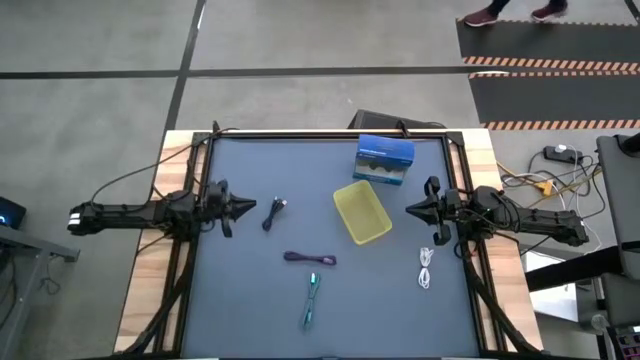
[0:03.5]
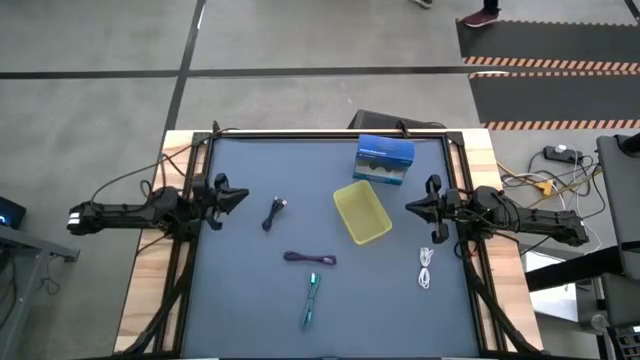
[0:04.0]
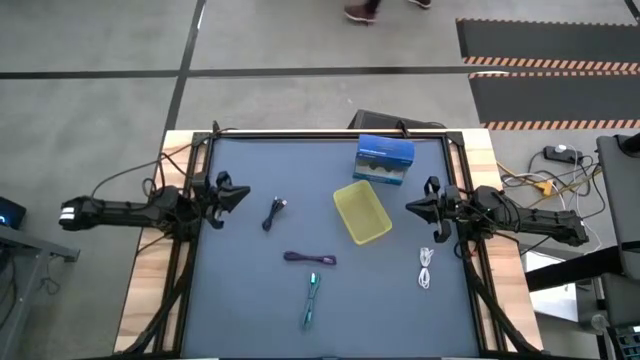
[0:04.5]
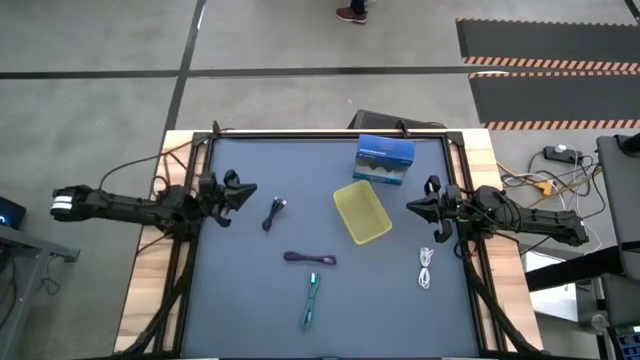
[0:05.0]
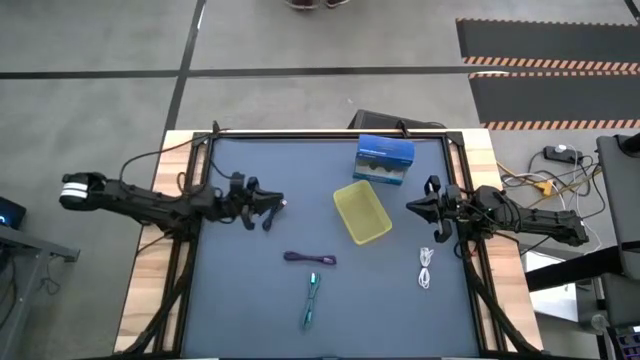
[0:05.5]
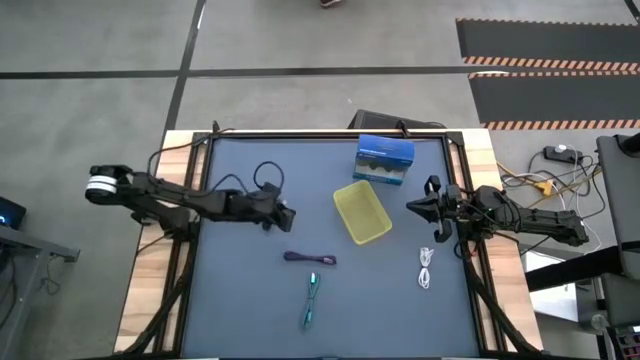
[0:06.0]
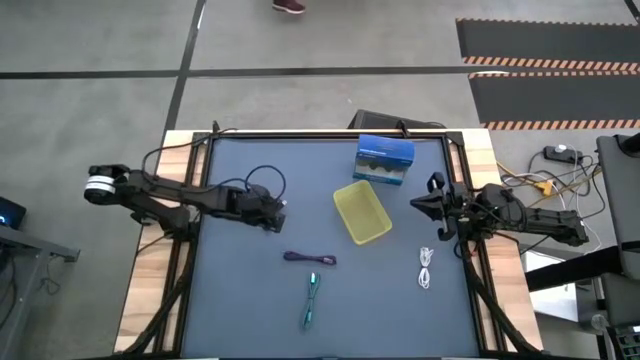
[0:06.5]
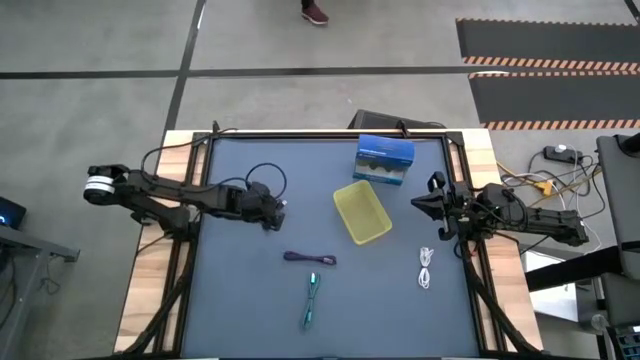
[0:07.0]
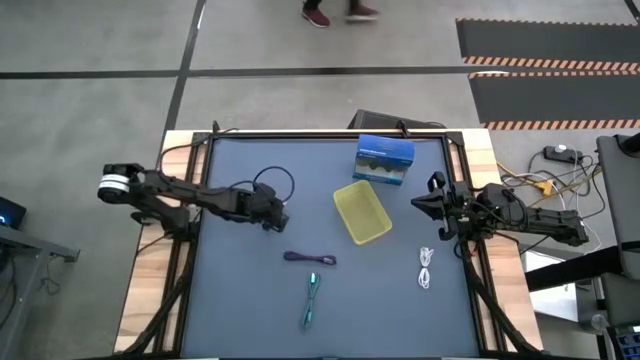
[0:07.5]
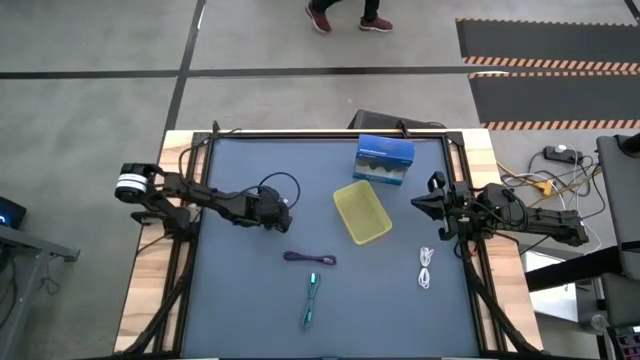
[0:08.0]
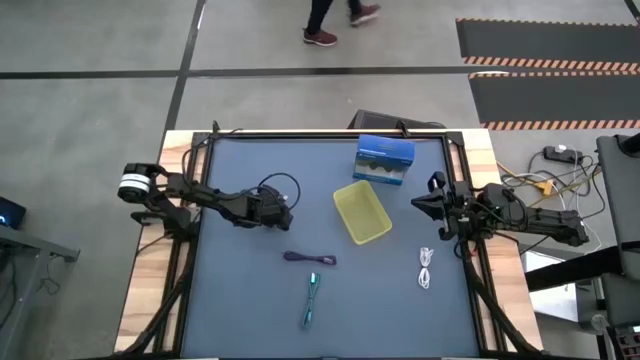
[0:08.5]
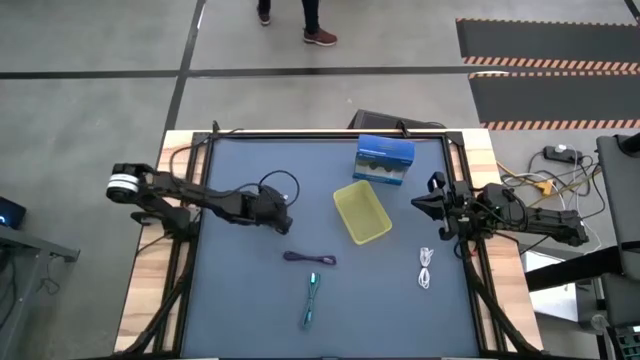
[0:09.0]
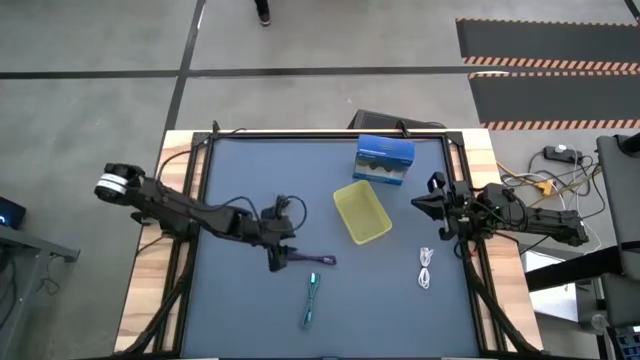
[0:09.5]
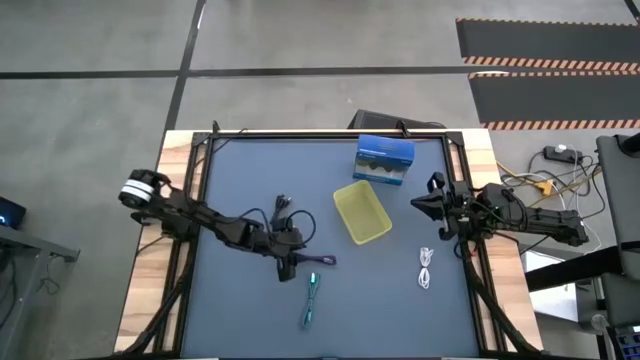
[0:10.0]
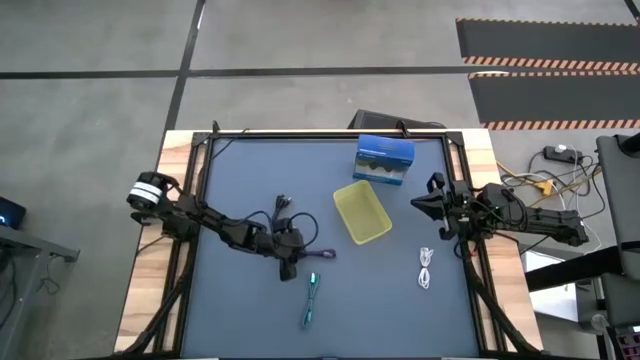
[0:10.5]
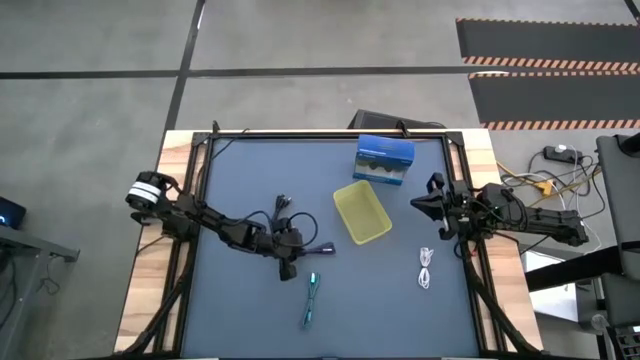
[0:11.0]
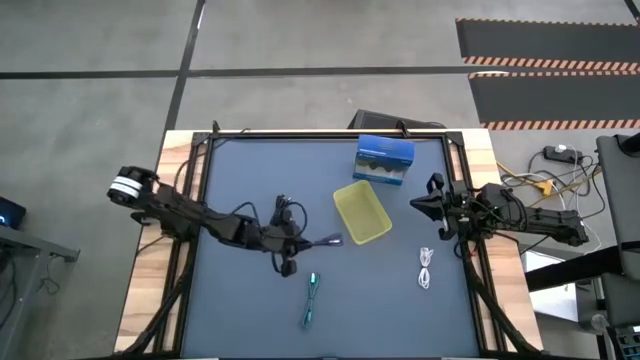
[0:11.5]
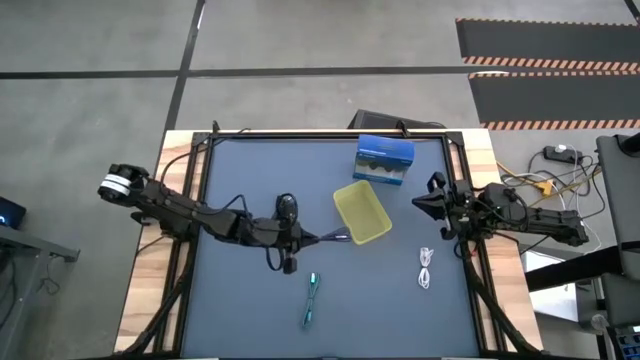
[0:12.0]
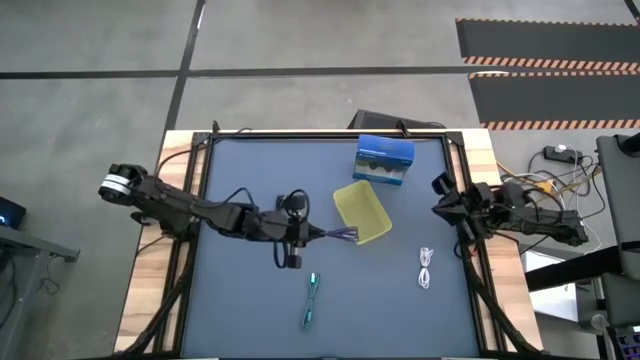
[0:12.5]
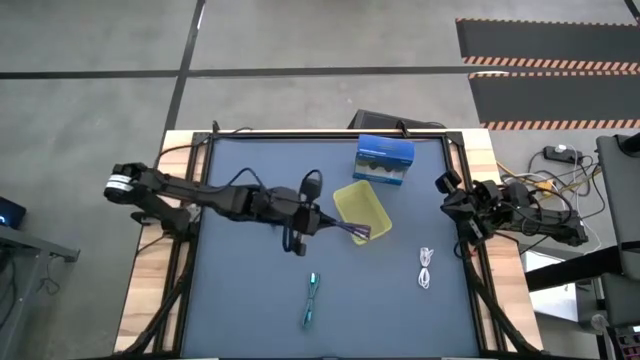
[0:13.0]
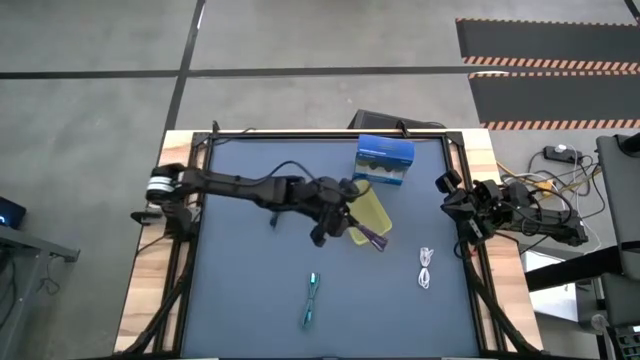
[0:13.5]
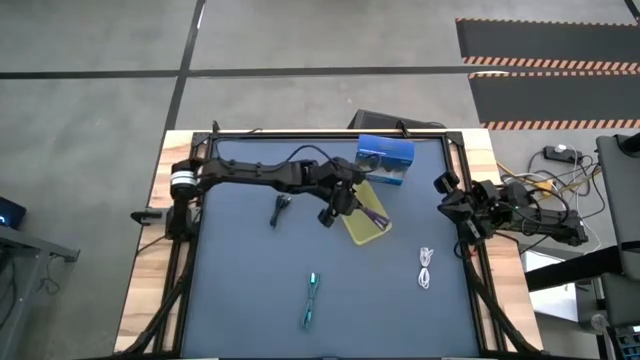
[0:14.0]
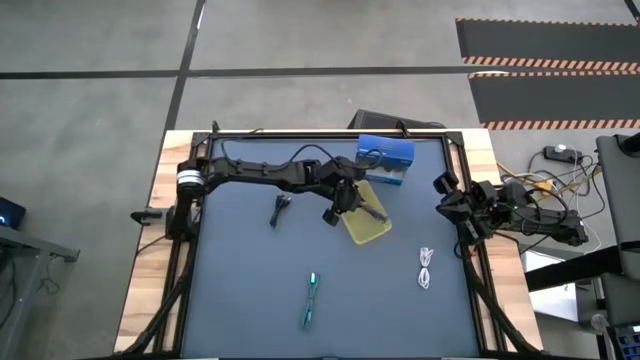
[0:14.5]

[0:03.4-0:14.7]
Task: Pick and place USB-C Cables
Put the purple charger cable into the yellow bin

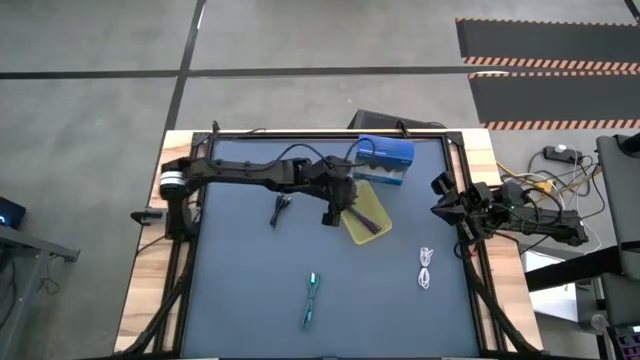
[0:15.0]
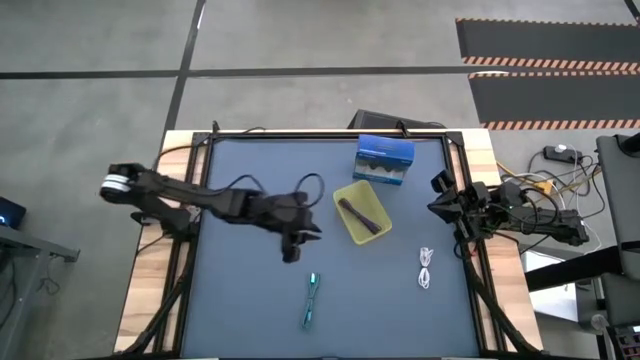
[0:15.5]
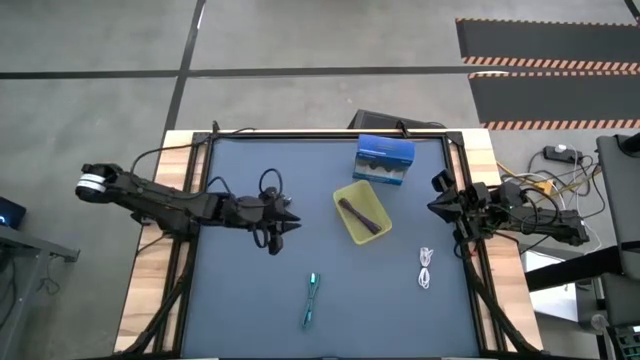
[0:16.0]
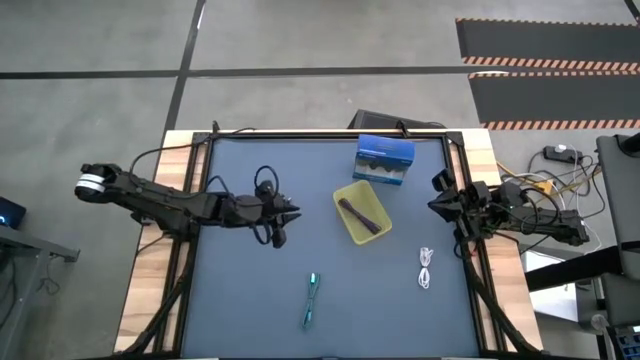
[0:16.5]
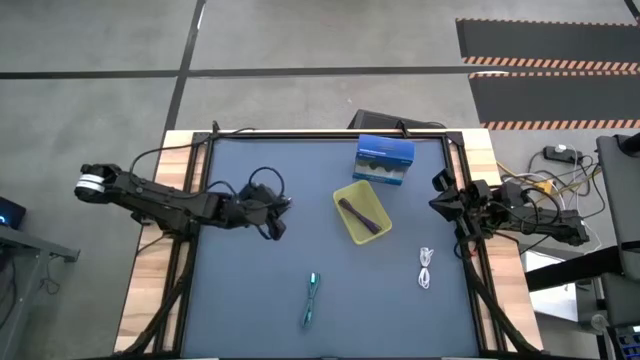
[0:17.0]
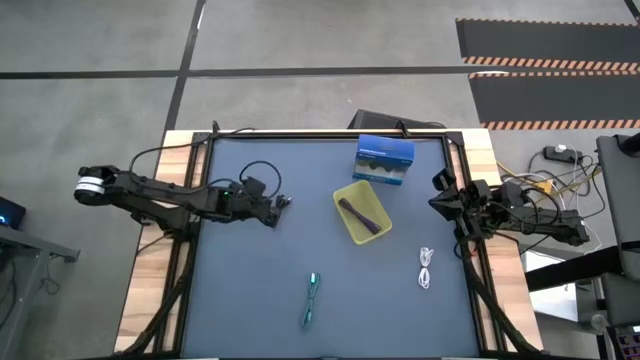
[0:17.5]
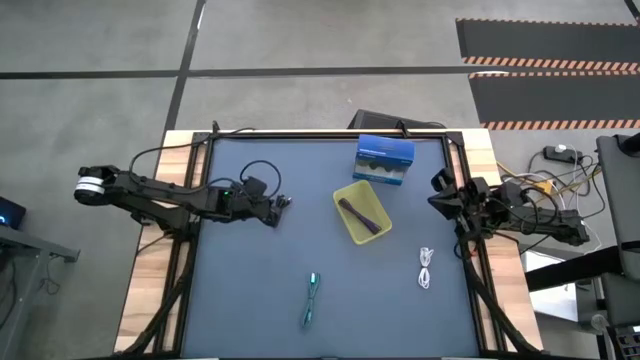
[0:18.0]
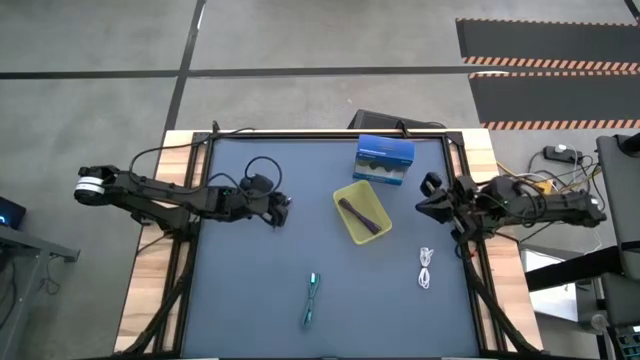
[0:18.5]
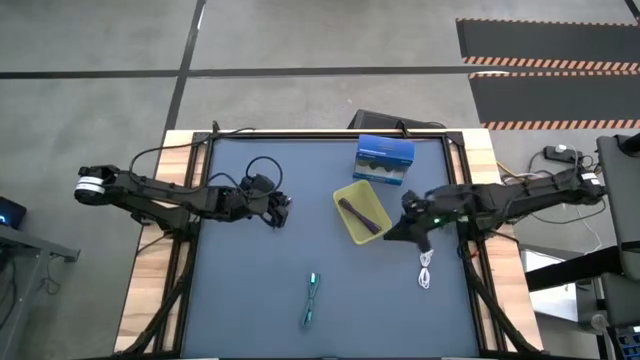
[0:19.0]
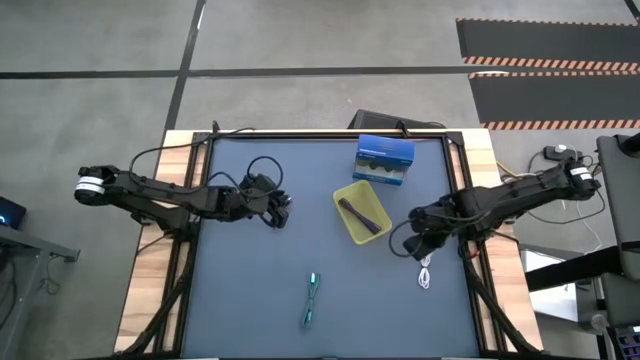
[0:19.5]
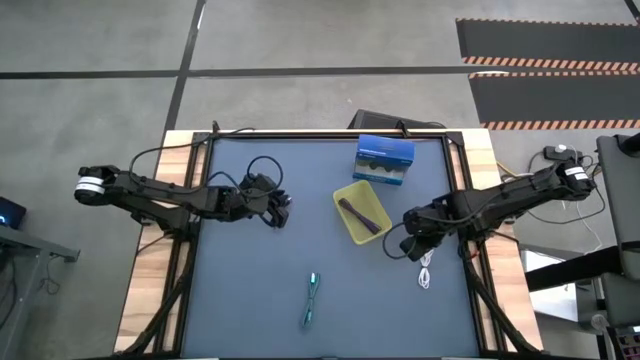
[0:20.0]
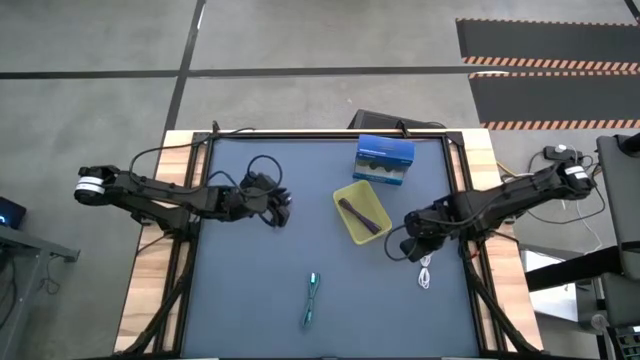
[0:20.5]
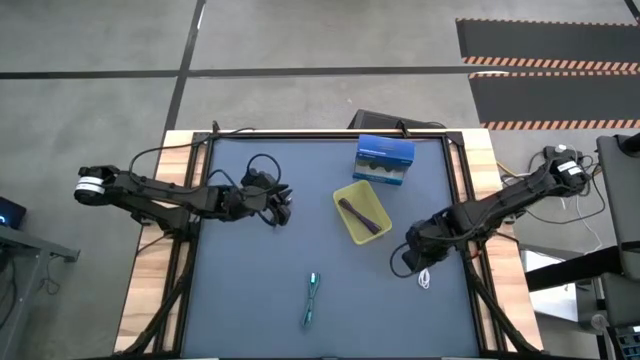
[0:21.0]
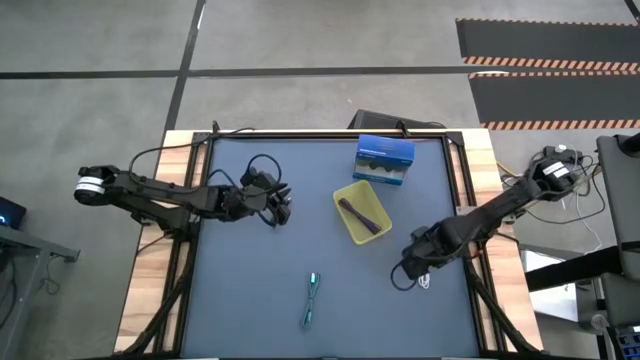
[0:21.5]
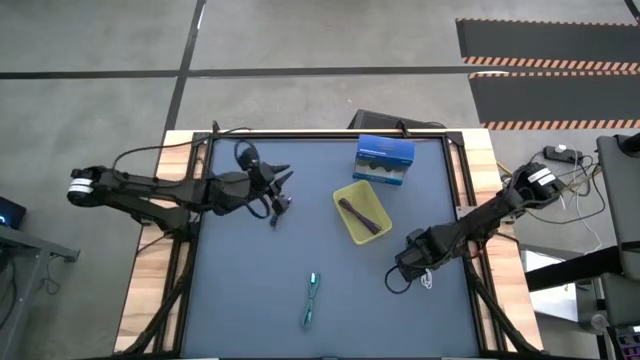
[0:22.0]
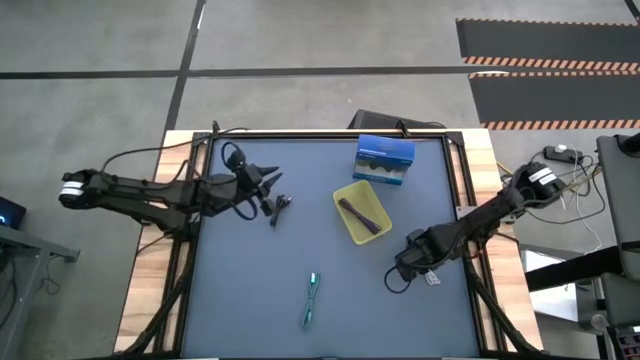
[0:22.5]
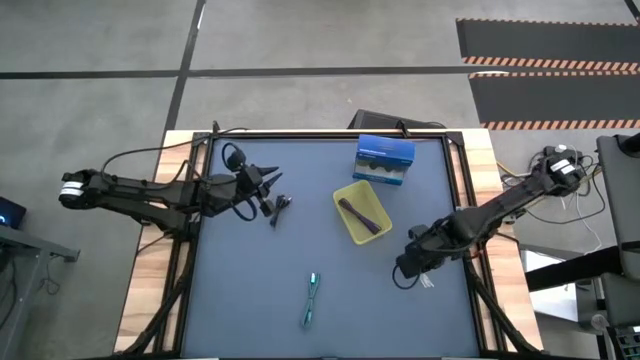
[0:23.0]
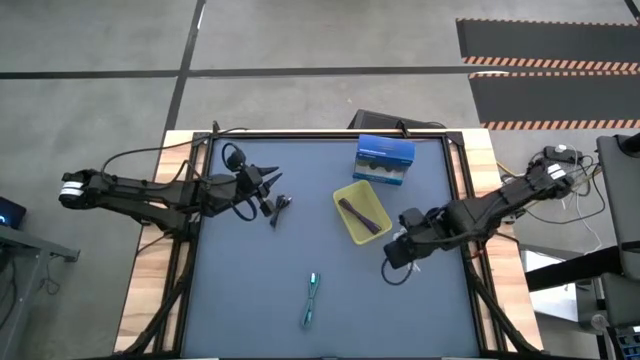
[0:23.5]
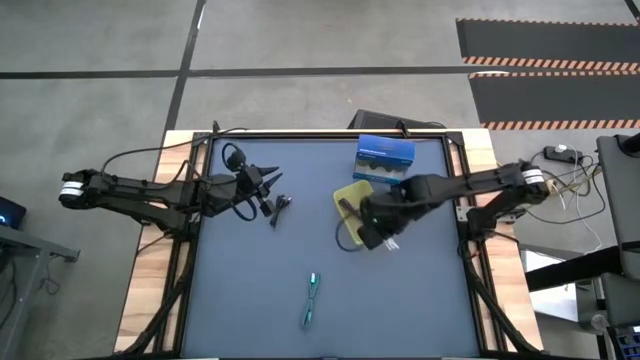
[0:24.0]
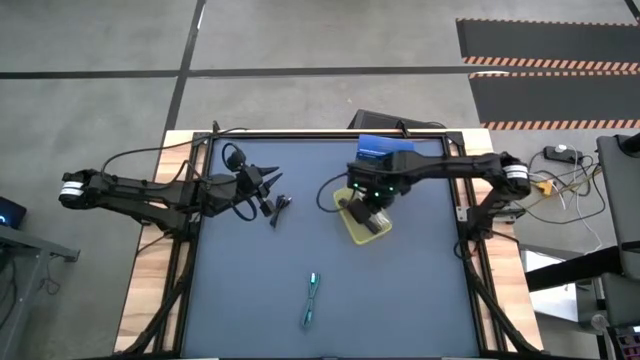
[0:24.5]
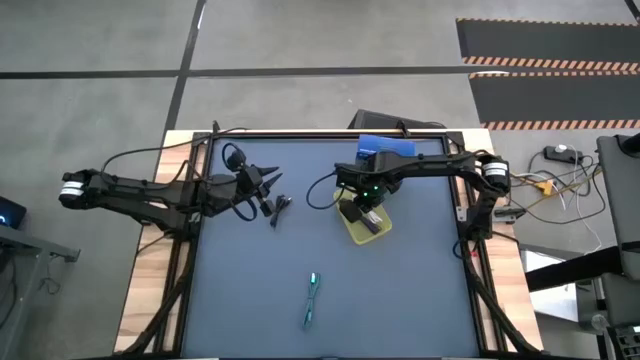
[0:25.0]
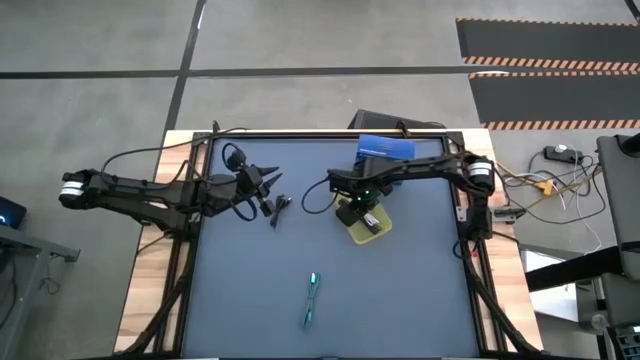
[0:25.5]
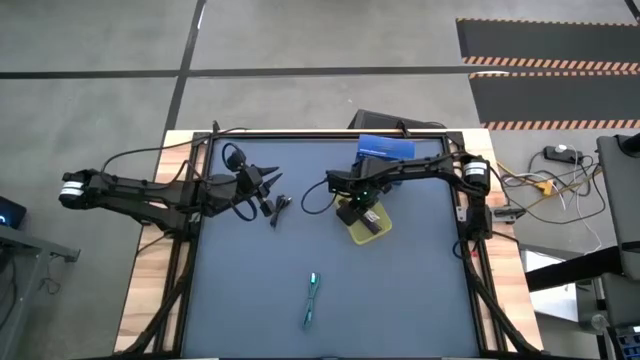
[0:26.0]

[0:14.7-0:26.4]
Put the white charger cable into the yellow bin
